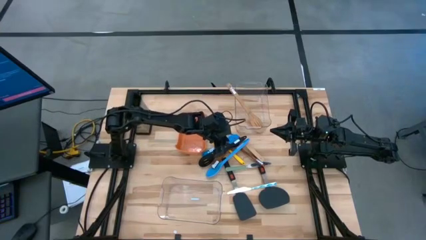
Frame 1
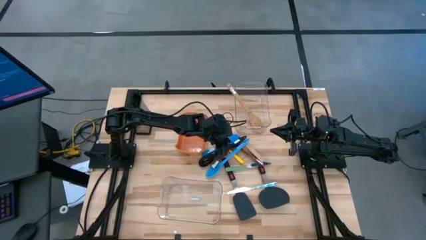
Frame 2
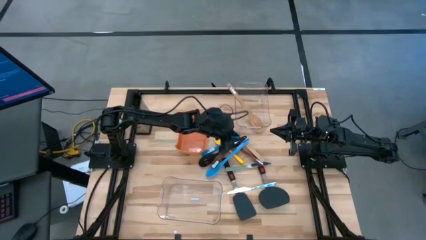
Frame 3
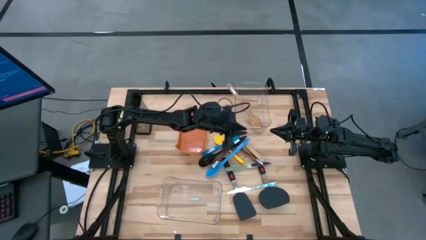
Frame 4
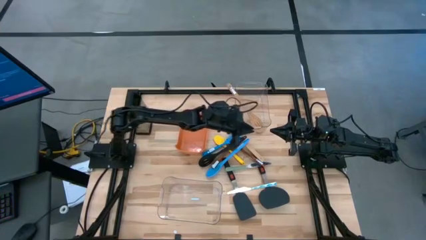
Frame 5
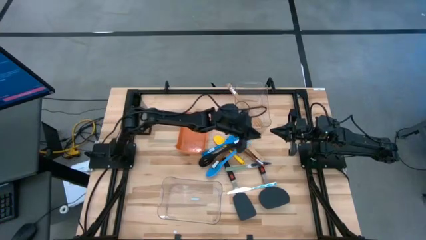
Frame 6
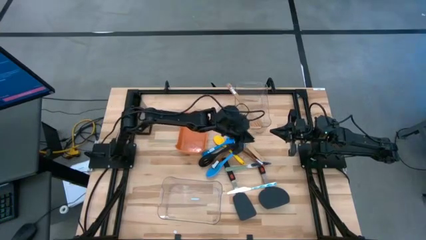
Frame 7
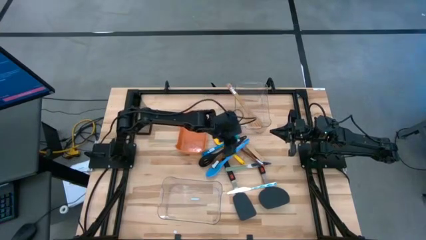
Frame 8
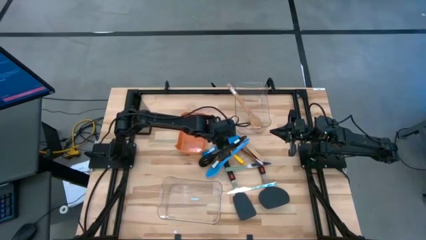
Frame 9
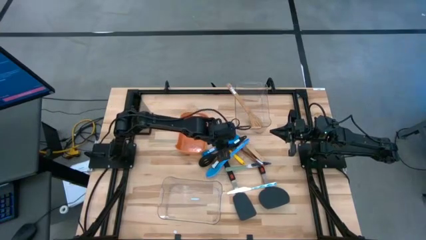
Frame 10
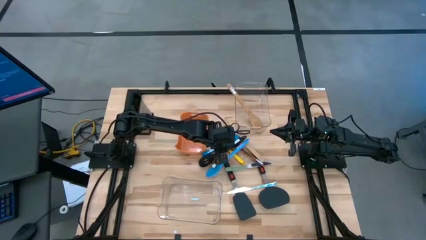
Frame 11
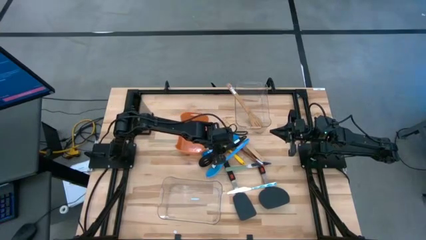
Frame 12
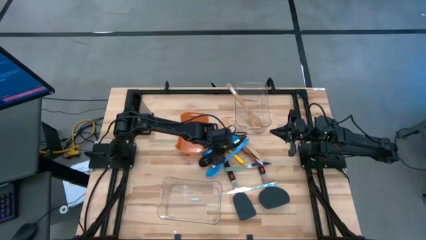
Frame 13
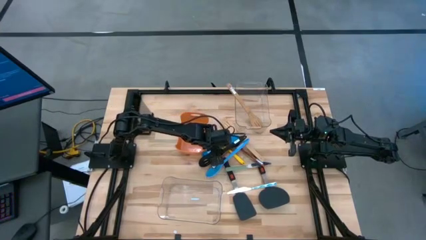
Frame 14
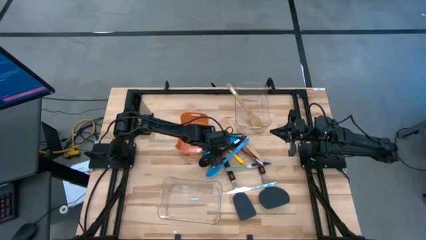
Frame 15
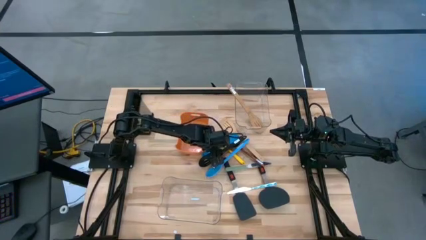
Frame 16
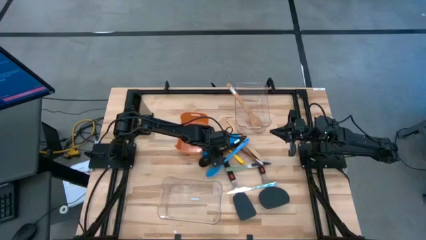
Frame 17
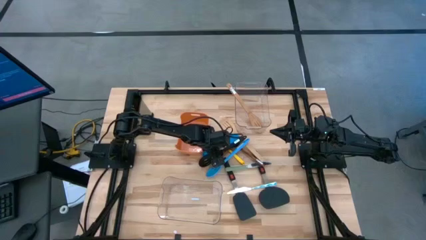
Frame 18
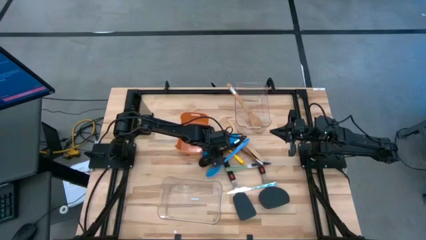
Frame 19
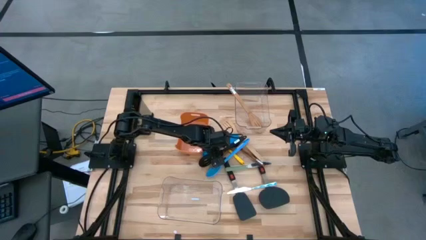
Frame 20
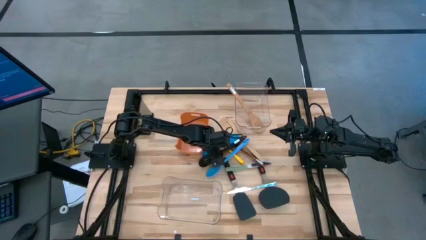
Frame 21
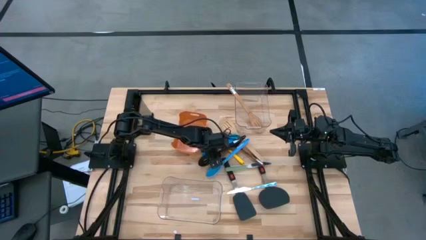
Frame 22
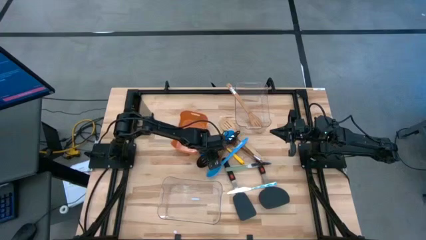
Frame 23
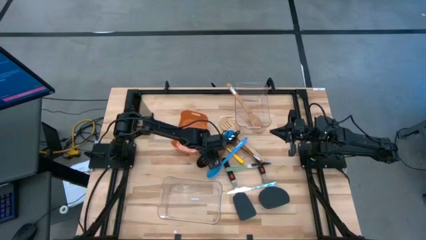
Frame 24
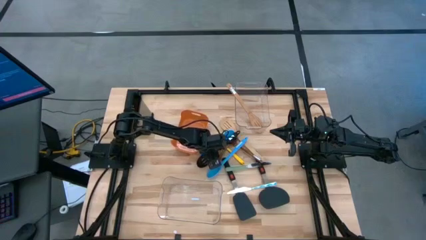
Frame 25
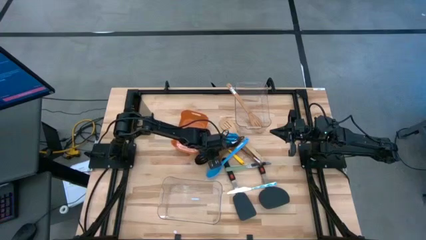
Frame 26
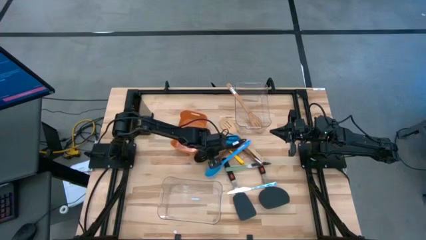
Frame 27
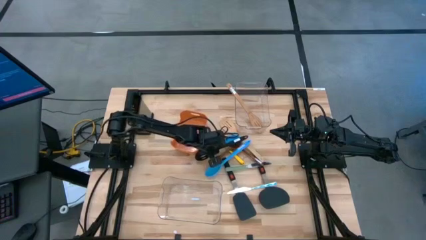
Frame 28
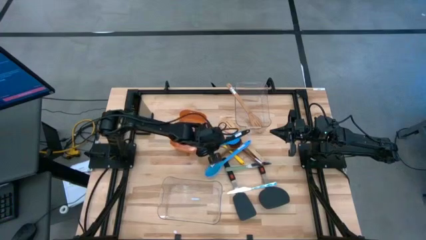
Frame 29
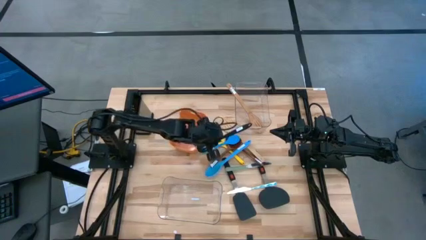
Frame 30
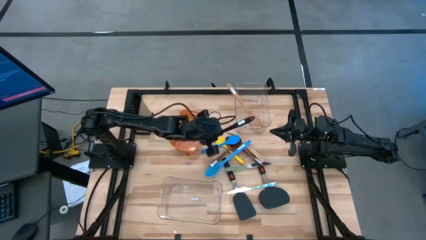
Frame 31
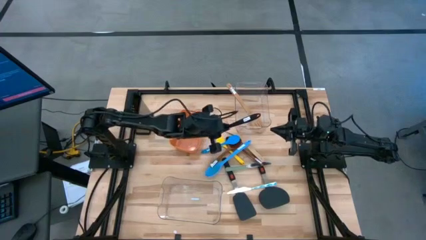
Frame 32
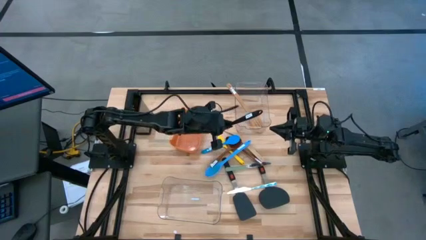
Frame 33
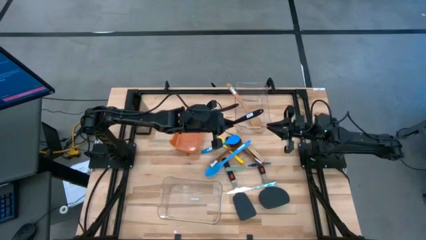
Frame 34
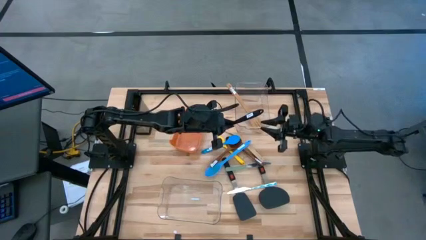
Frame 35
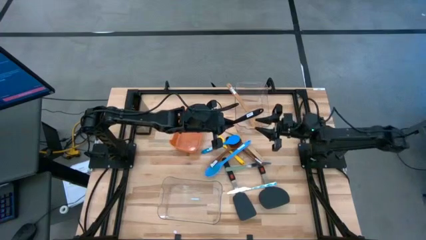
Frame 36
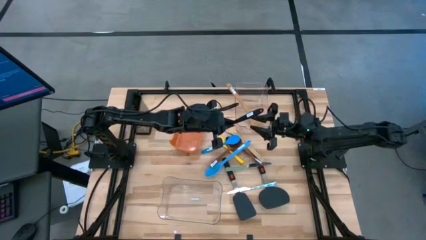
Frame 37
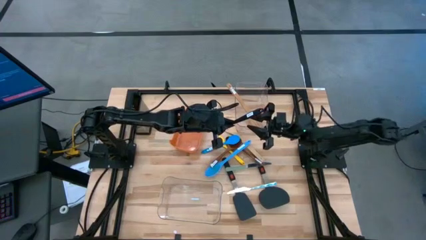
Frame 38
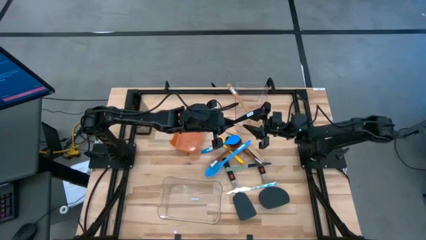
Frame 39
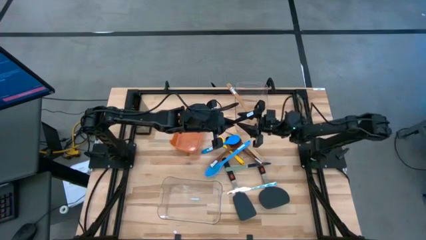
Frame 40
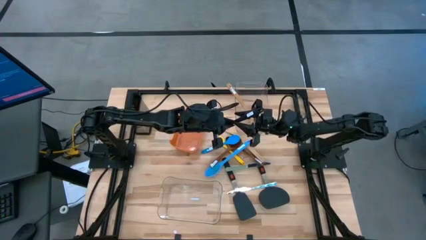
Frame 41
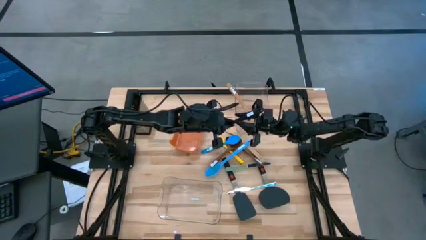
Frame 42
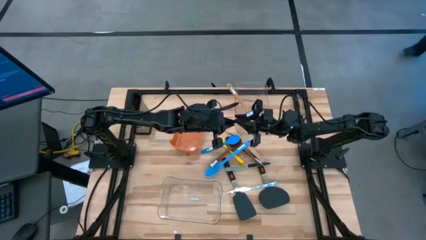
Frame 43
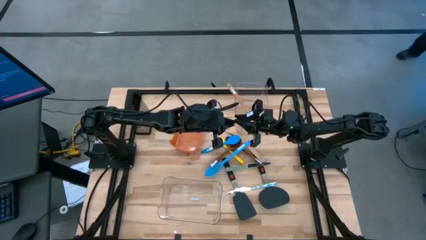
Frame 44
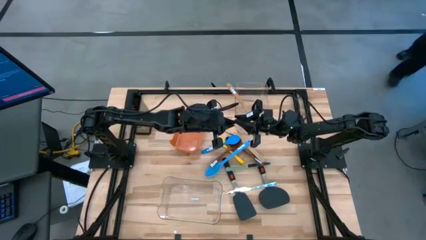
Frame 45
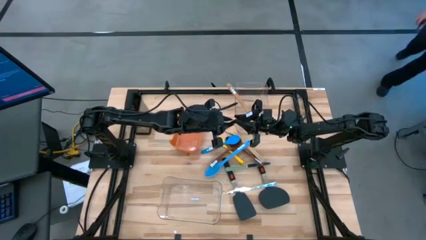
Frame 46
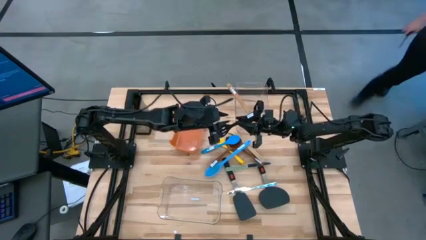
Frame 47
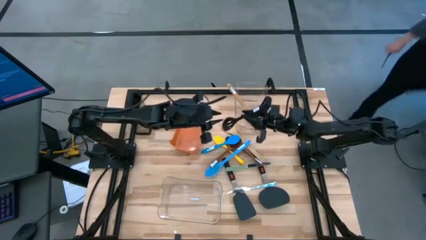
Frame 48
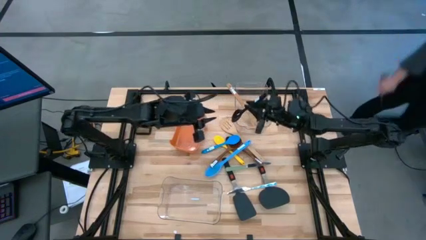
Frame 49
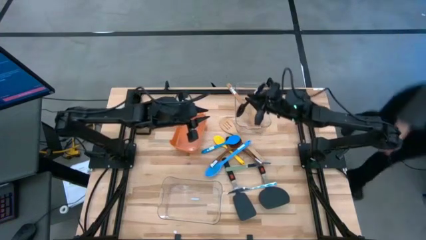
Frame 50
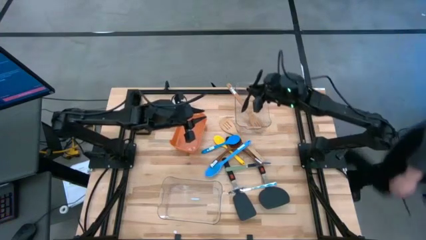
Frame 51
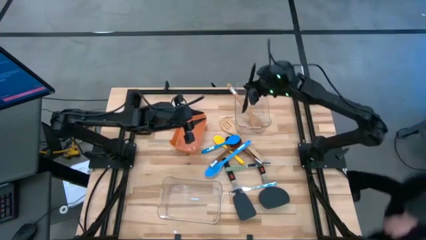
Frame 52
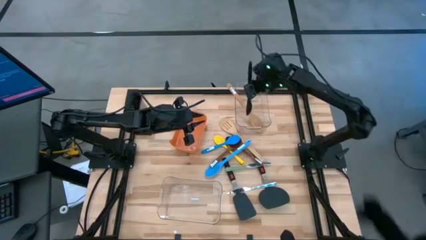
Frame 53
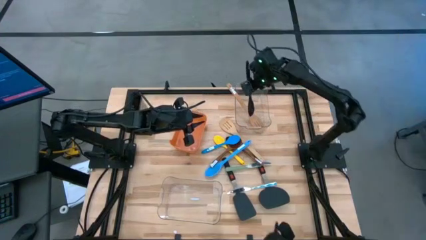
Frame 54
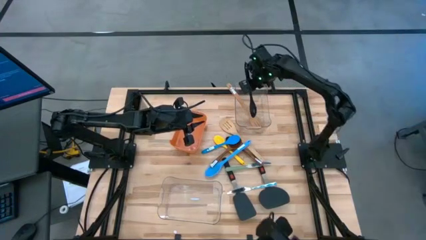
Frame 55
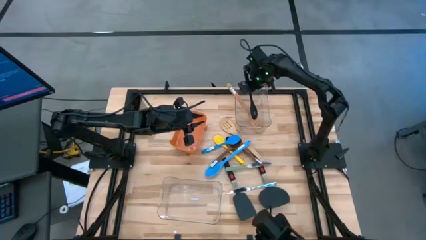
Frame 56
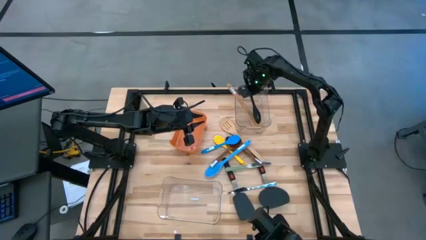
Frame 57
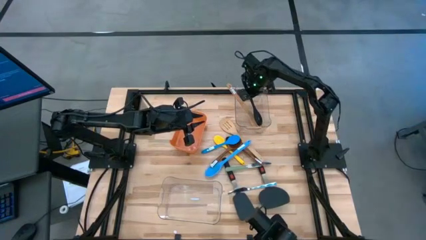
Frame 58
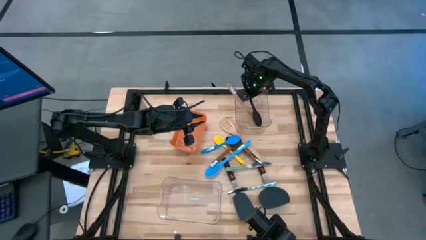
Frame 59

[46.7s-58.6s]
Task: Pick & Place Kitchen Items
Put the black spatula into the top transparent bin
